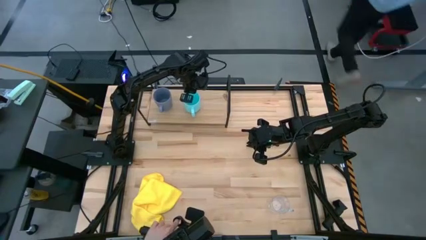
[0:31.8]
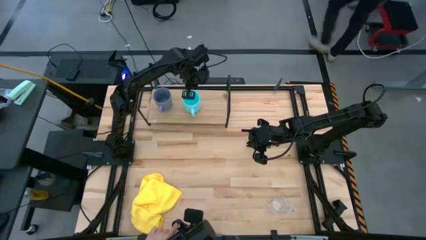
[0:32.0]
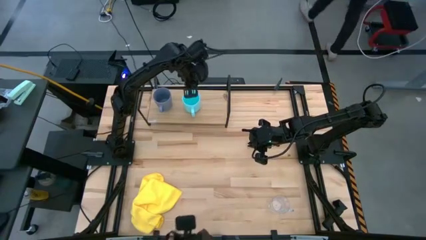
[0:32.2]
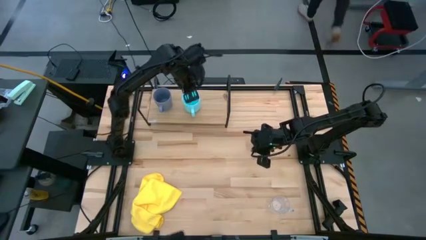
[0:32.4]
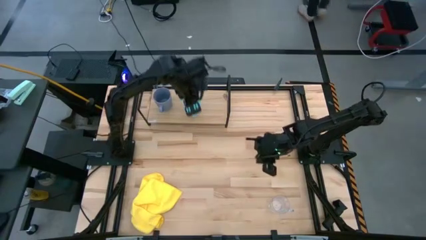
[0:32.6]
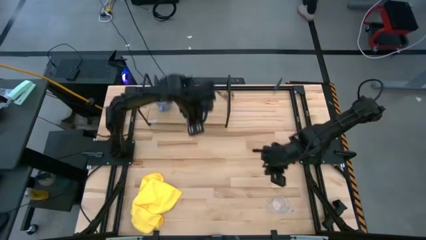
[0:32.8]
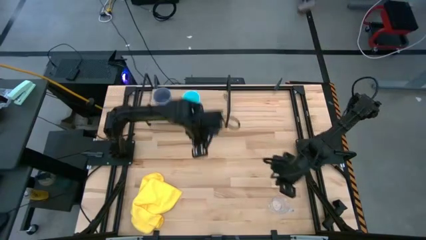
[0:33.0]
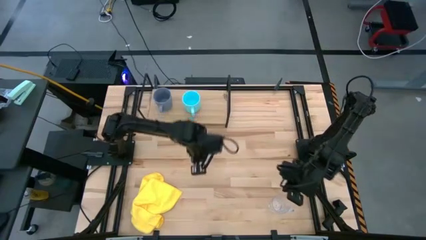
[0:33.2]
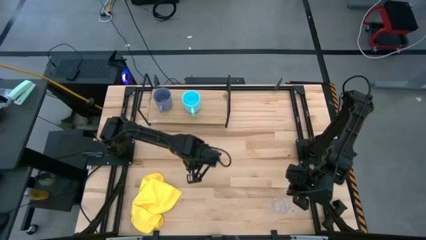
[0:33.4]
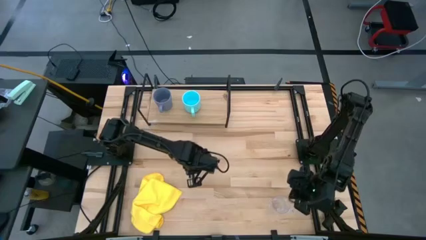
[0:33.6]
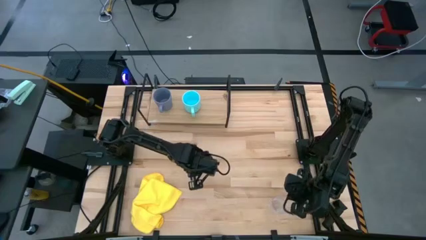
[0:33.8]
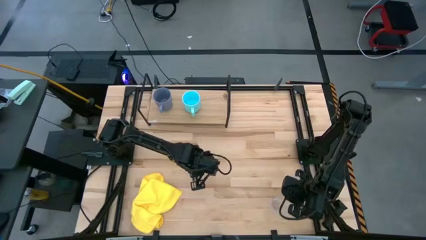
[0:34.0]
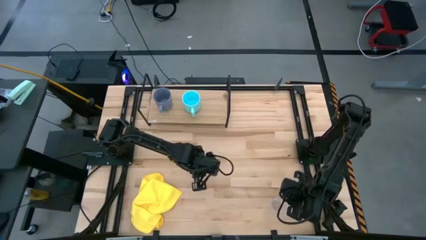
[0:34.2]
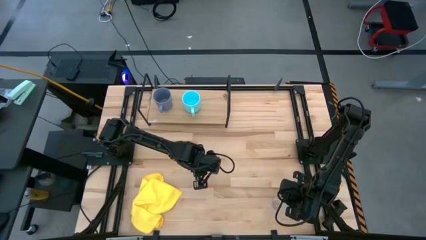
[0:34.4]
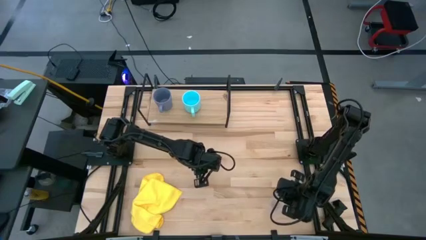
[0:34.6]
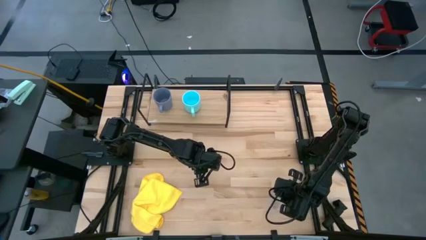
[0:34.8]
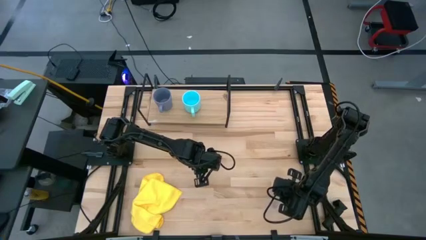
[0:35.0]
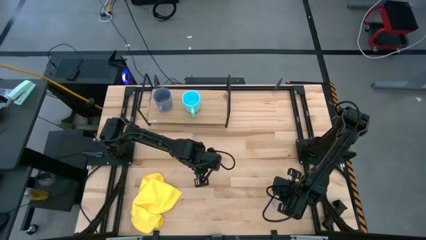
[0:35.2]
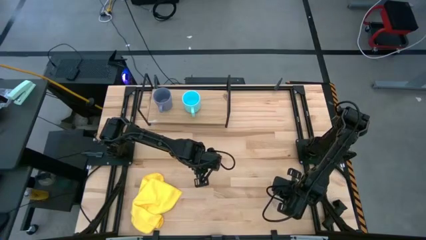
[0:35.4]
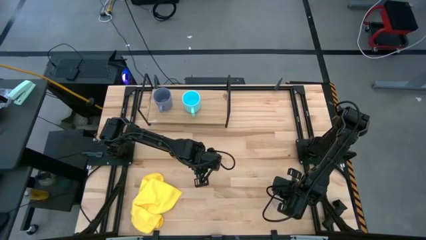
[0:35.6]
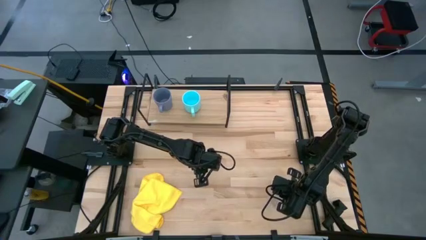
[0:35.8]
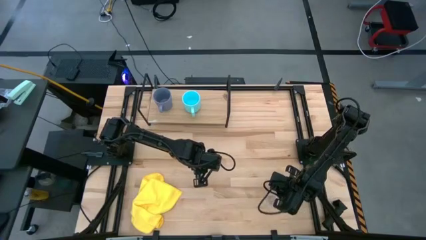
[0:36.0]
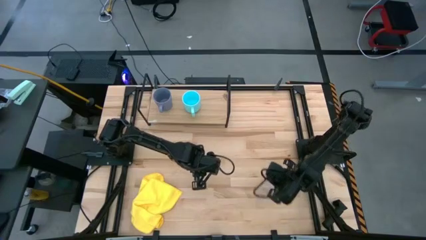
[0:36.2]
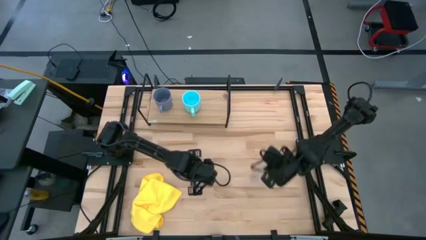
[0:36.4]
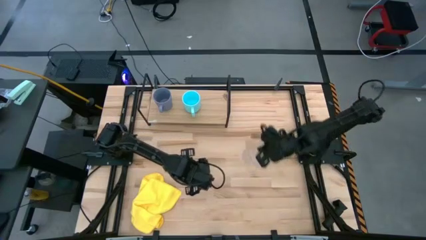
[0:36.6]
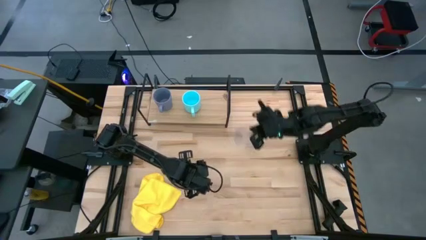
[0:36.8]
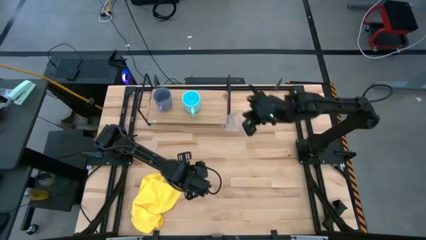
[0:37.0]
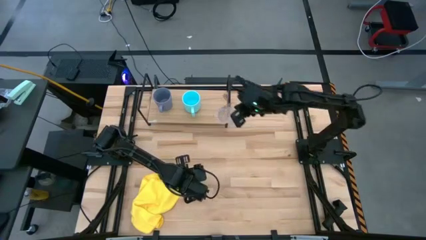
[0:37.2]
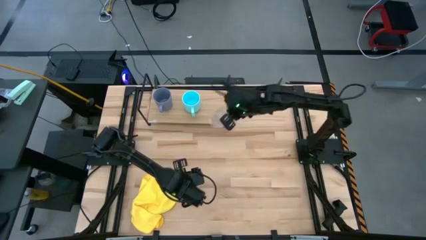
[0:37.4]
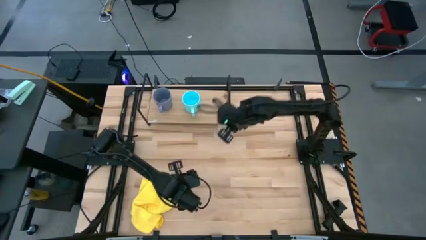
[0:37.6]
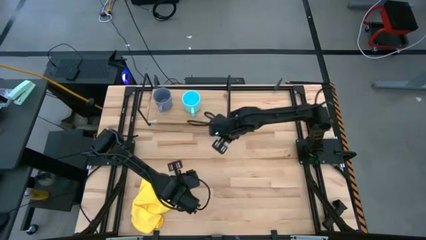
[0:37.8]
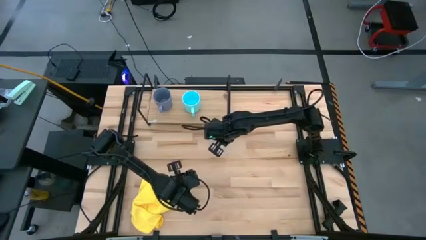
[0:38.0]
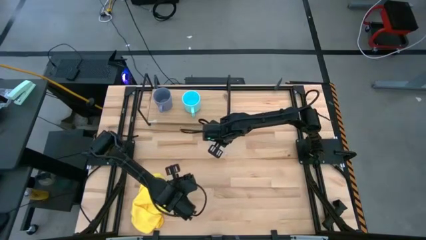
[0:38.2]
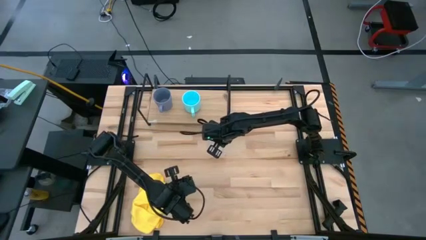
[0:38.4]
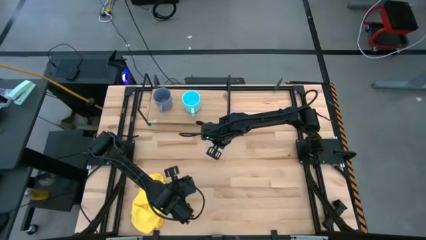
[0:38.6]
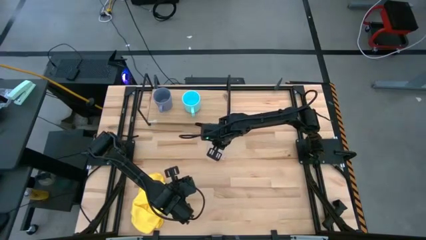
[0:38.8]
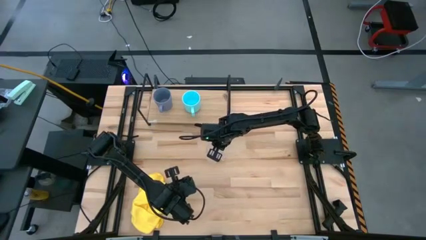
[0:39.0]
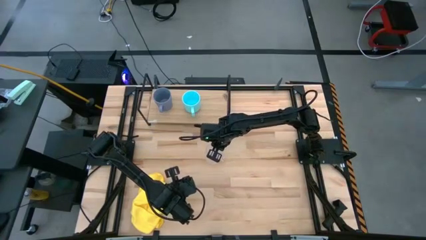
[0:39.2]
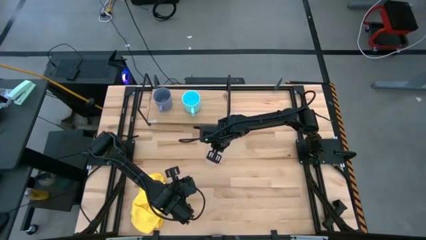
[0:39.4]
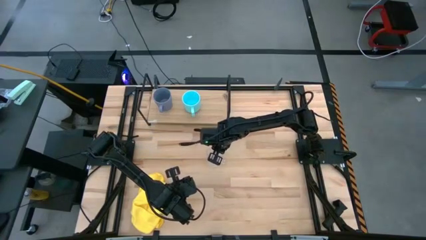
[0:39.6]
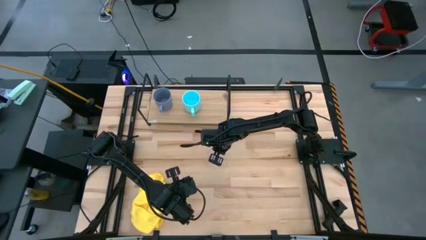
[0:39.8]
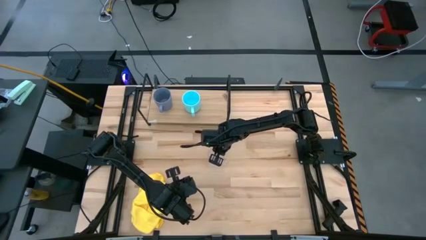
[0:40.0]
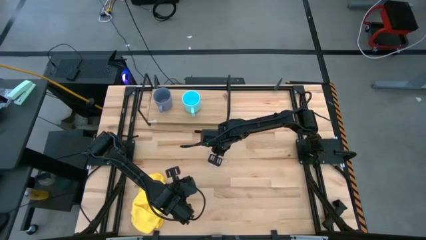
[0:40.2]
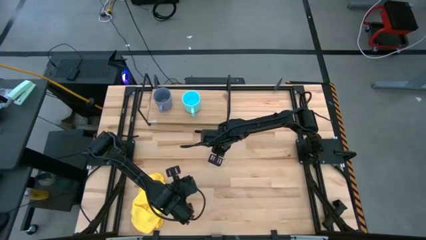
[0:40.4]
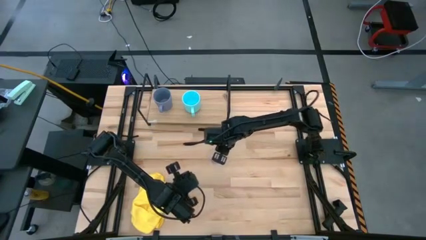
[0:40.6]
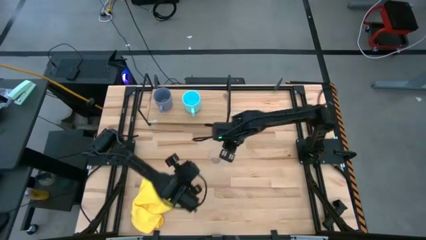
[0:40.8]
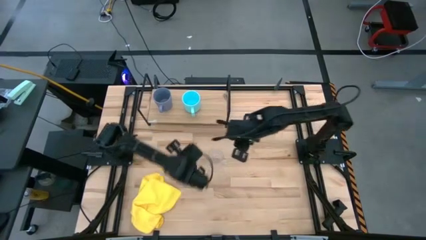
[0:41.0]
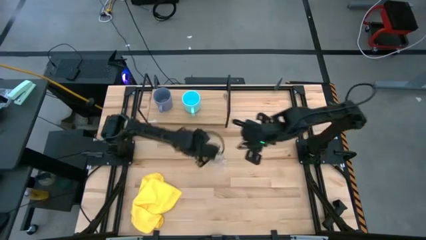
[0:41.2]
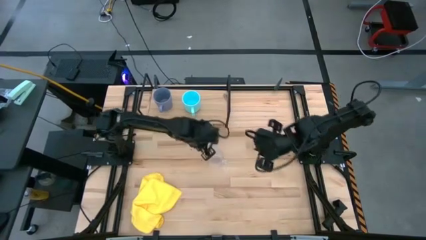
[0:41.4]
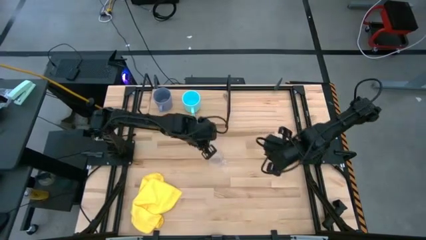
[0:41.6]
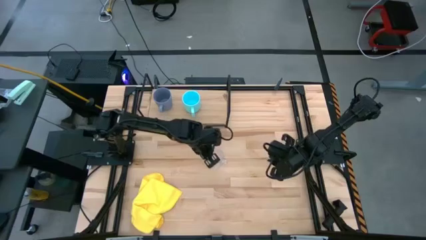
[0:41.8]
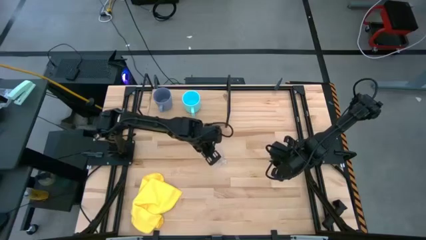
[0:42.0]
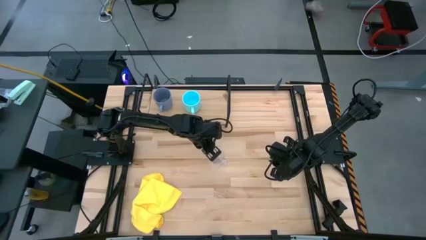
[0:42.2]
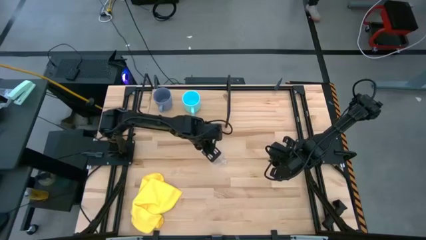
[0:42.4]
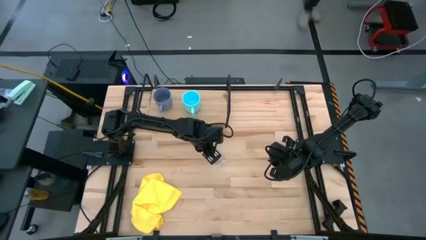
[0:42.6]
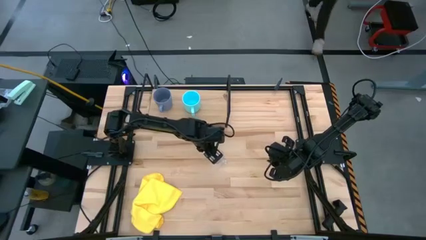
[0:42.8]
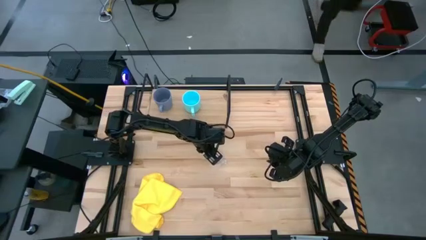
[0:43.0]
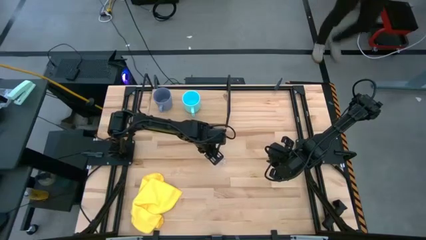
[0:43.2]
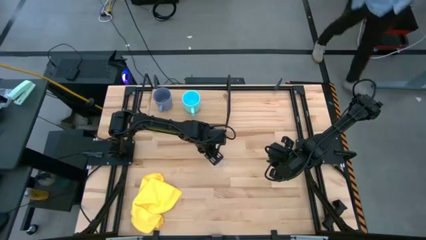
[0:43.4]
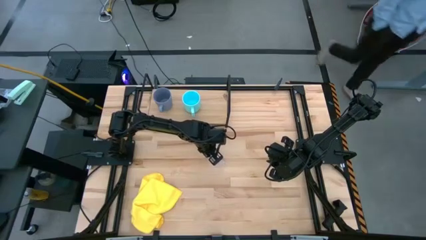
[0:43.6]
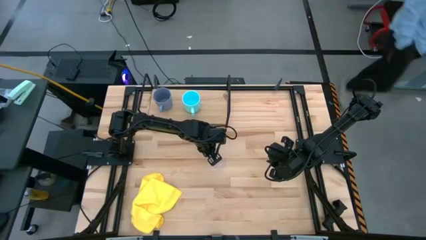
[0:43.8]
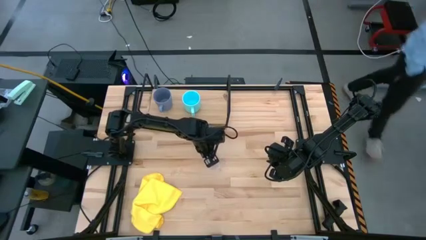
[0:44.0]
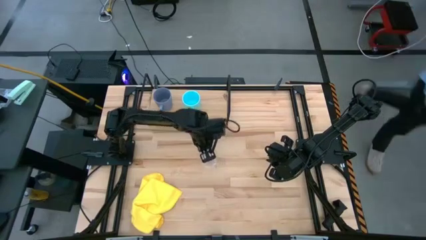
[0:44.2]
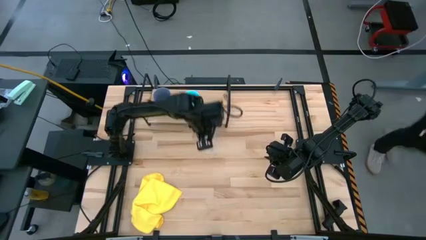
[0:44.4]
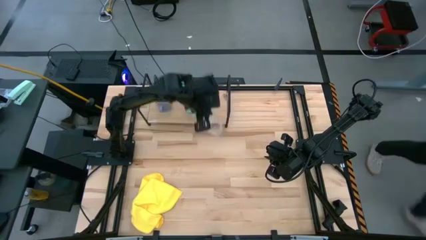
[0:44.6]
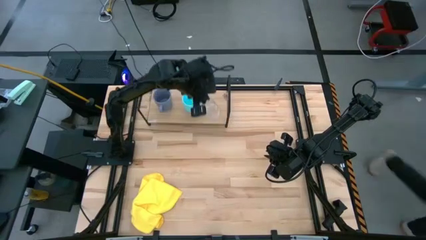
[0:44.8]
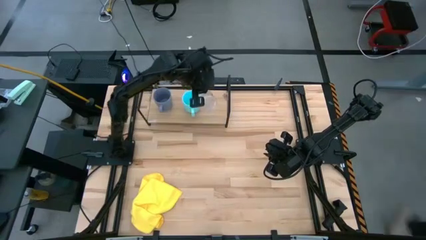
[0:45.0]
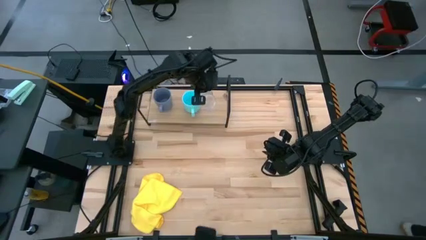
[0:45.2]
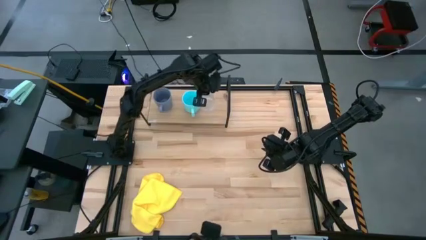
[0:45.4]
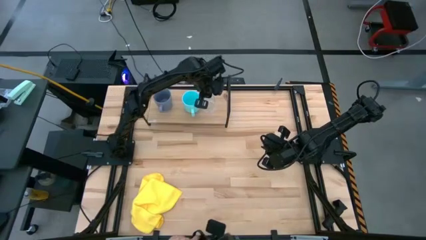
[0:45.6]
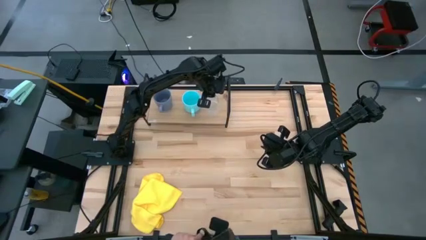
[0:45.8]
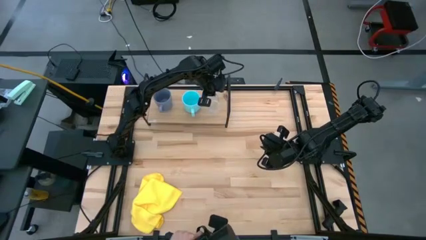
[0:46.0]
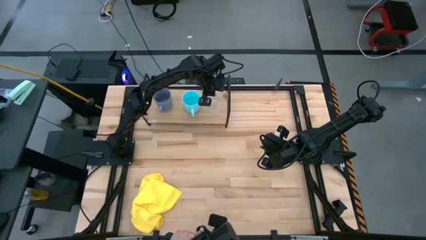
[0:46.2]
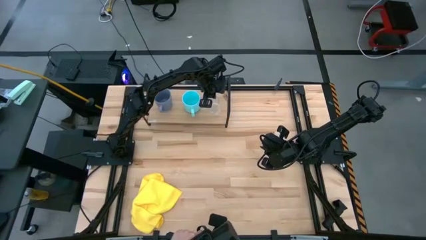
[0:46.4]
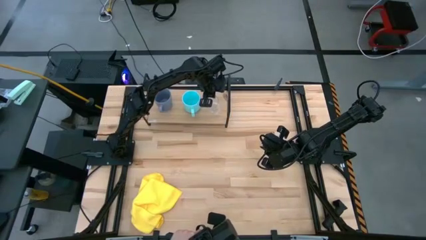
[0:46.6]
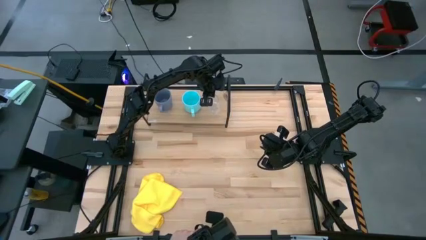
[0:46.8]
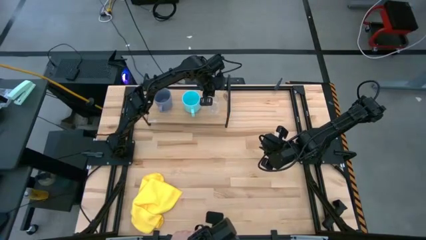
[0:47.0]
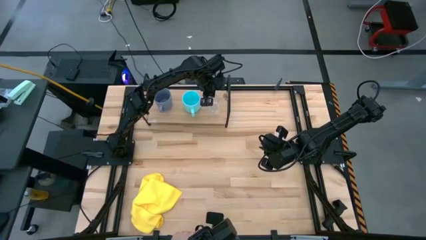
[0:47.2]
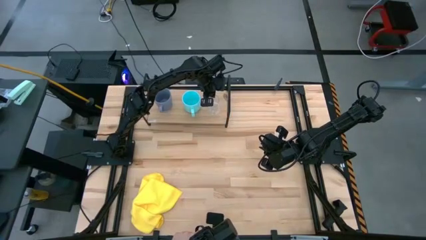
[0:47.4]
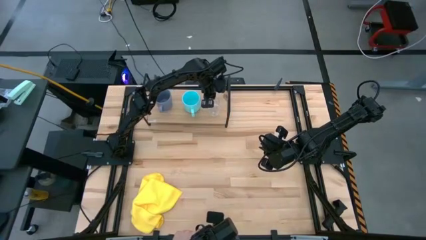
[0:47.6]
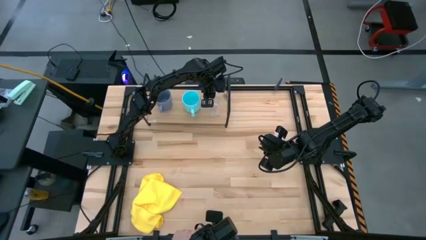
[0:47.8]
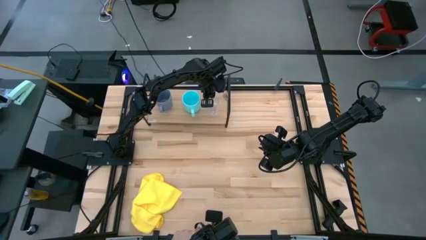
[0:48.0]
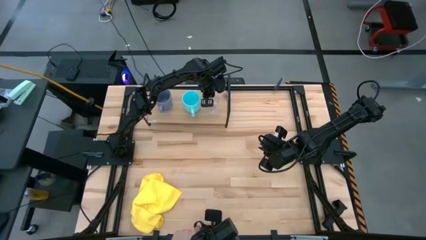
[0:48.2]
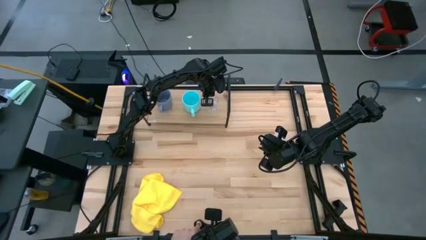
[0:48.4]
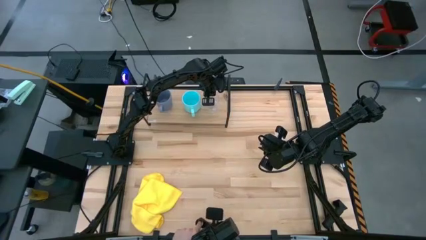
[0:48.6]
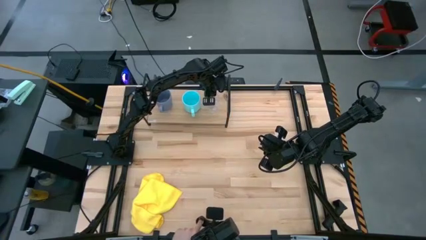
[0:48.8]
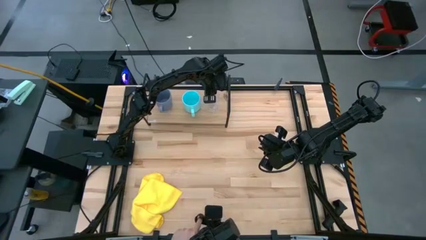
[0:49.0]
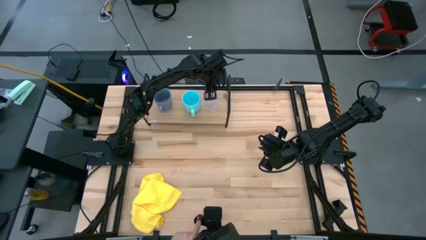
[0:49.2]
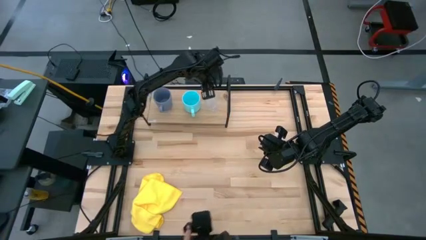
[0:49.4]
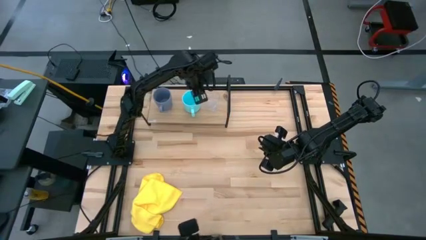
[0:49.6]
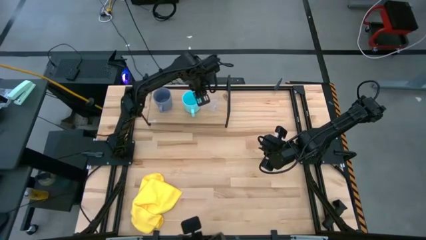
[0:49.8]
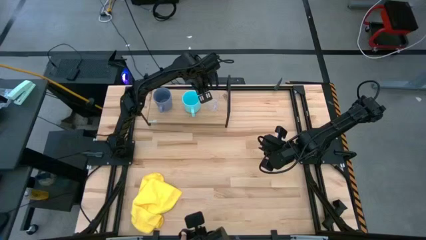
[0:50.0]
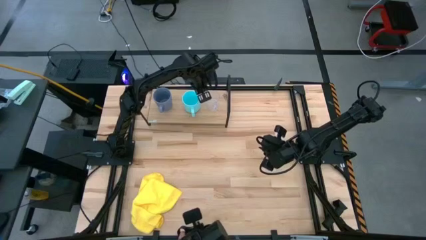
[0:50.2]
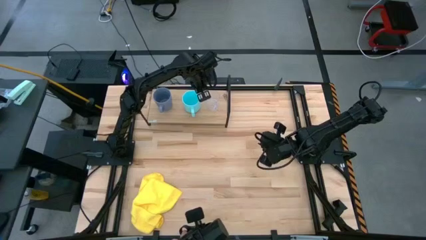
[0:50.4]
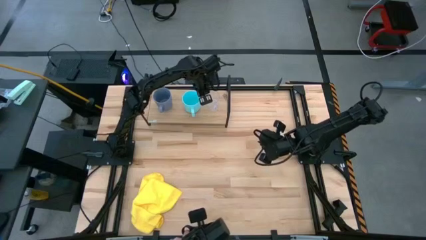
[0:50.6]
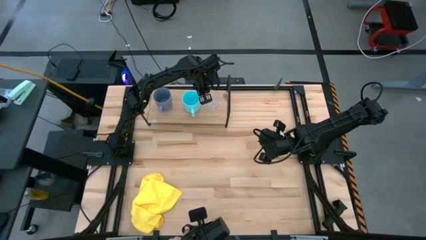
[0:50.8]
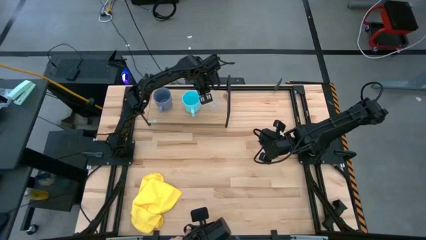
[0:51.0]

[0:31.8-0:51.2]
Task: Stack small to large cups/mugs on shelf
Put the transparent mug on the shelf
